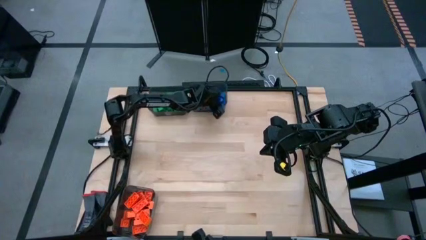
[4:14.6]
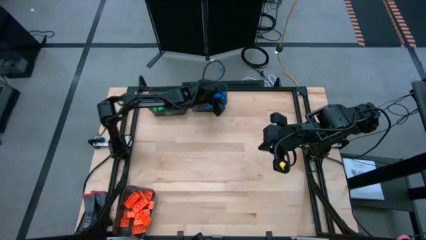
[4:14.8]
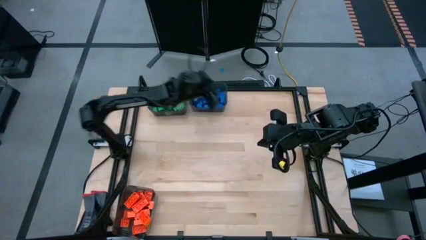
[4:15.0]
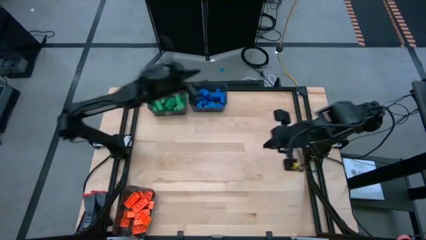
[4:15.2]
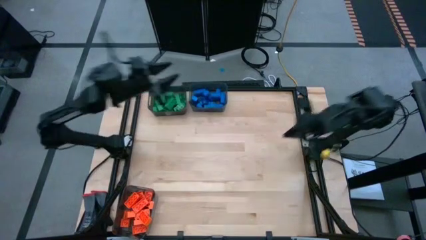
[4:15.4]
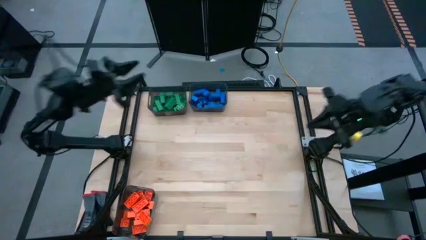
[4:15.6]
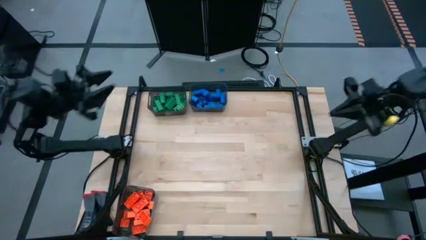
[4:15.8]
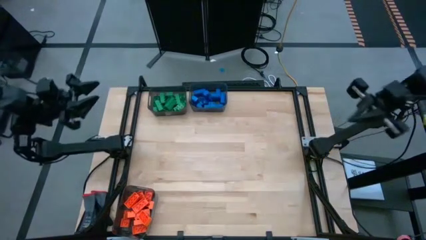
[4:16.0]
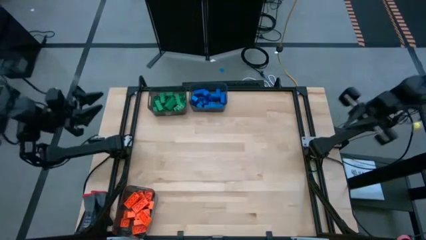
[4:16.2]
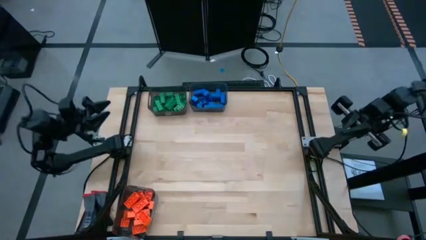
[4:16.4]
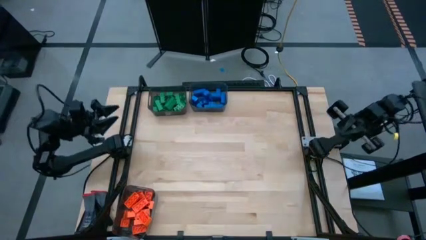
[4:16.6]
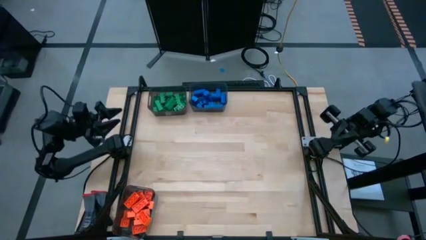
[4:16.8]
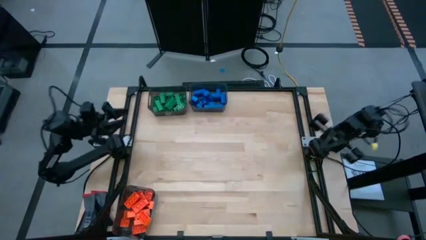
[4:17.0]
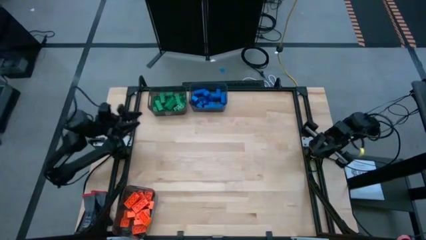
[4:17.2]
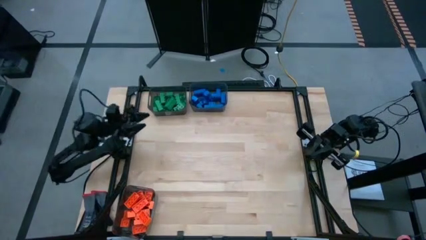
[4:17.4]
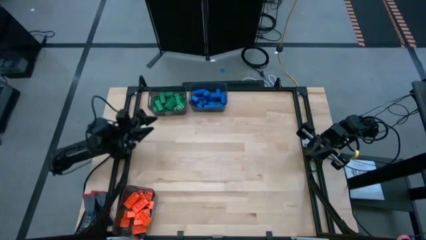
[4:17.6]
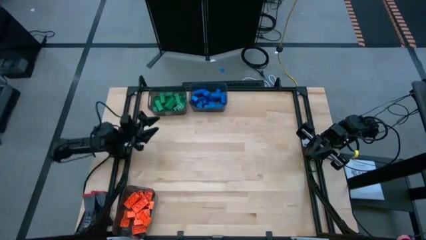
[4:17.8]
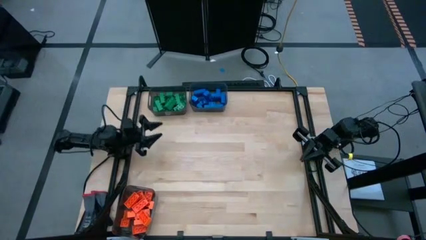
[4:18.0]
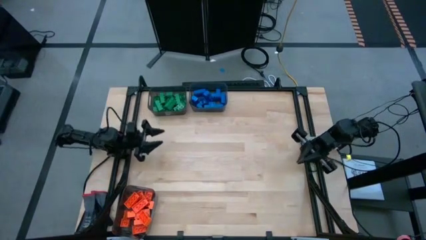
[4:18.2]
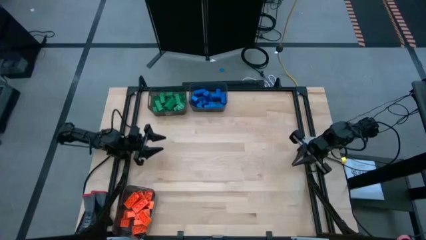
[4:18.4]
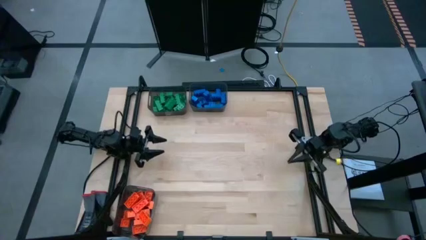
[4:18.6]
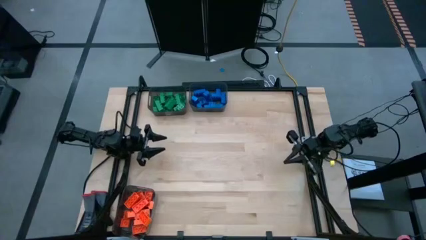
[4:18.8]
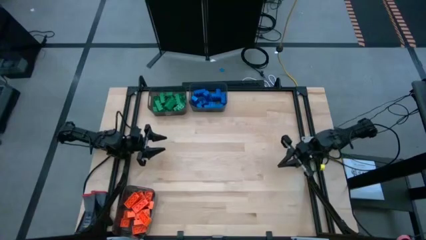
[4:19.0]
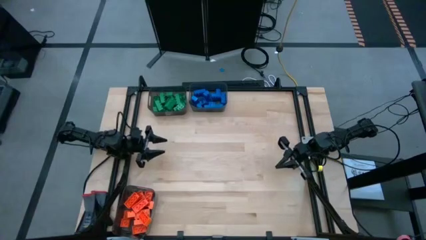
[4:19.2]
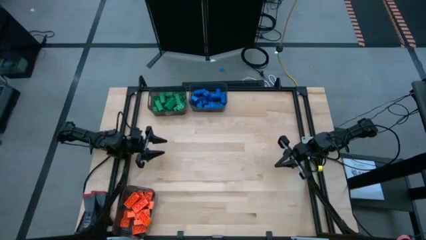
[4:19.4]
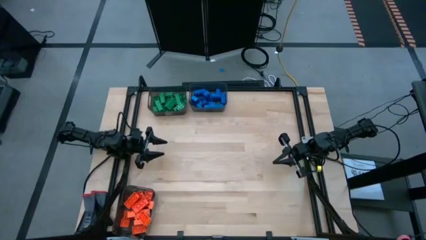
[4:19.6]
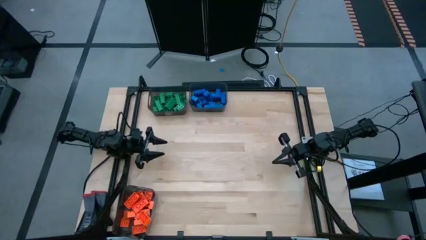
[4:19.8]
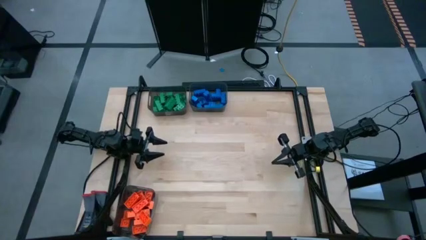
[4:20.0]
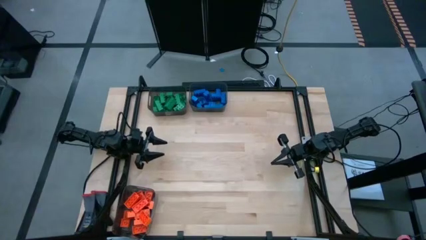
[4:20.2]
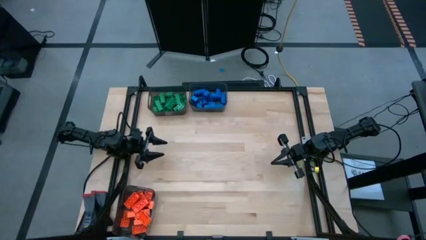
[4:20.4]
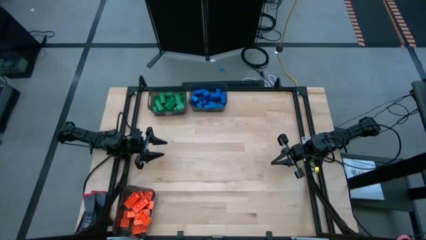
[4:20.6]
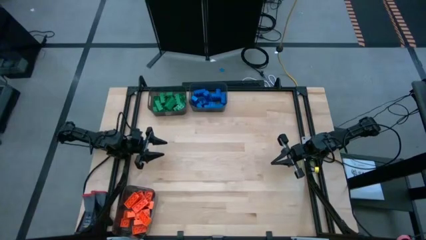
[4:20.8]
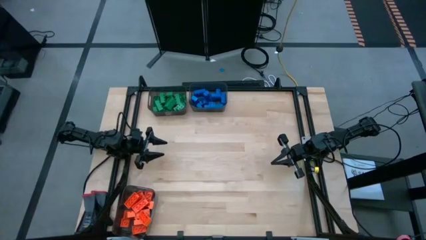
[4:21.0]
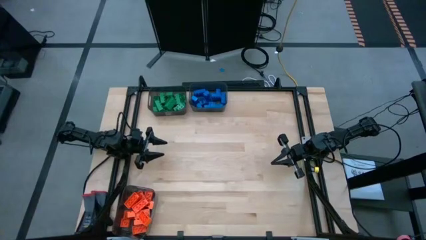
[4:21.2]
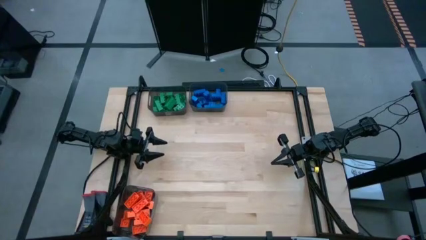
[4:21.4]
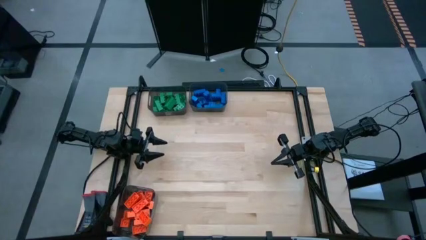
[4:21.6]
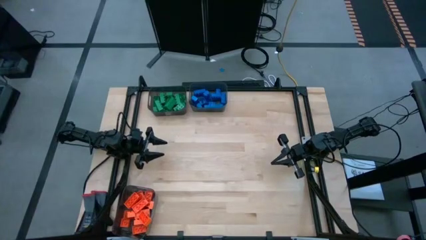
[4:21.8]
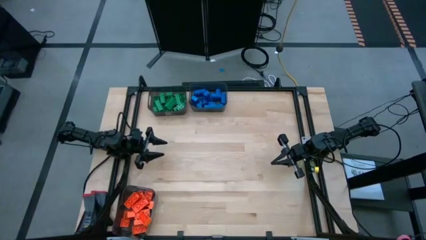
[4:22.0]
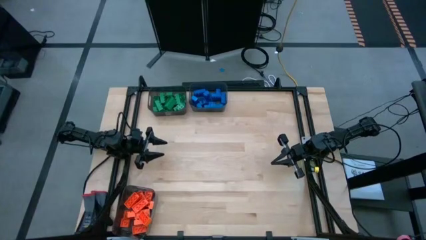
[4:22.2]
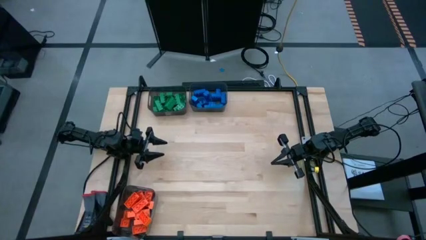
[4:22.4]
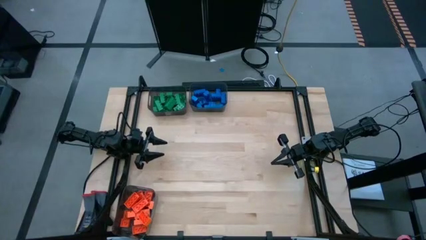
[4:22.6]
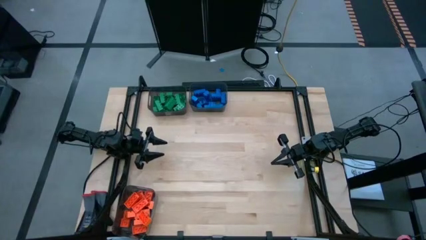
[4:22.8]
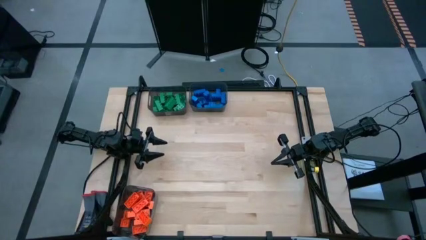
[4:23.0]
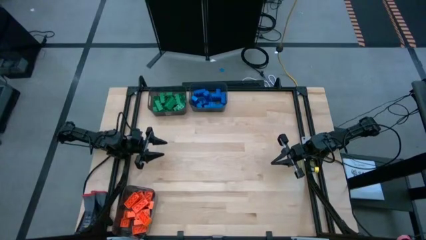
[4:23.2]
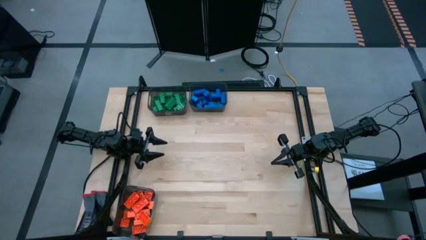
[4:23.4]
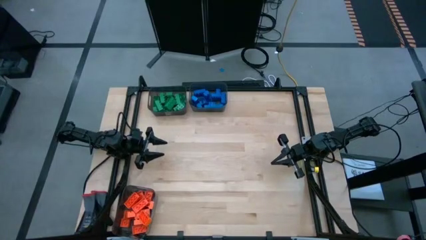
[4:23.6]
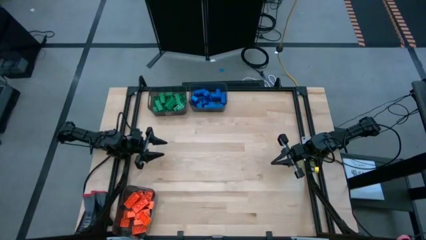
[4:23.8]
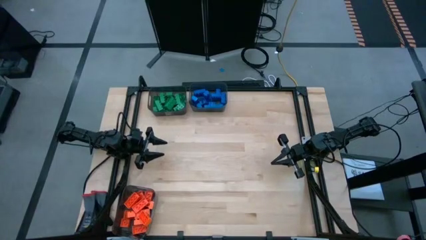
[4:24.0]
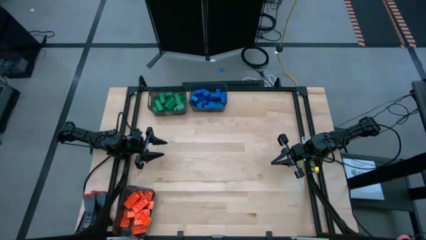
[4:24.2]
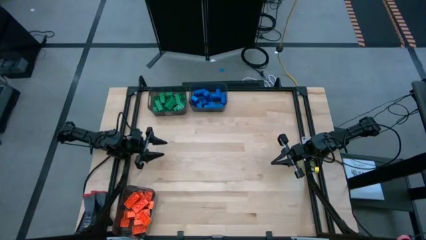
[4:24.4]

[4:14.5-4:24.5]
Task: Sort blocks
Return to Home Position

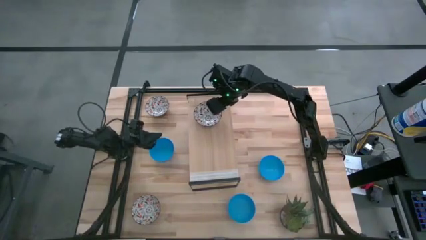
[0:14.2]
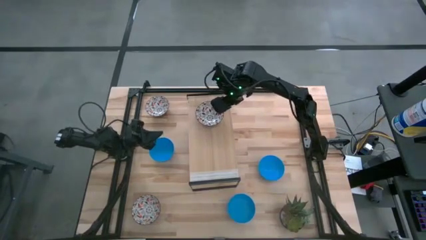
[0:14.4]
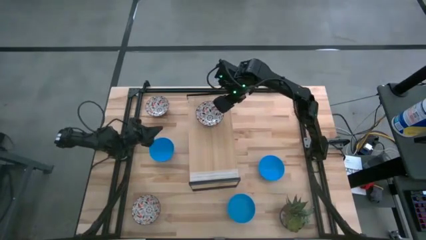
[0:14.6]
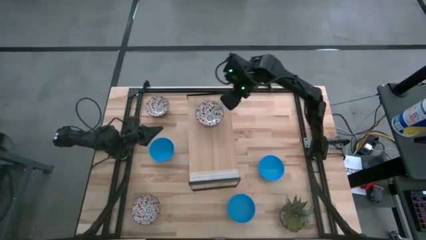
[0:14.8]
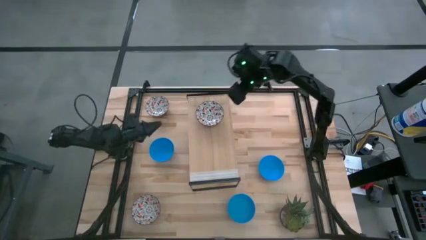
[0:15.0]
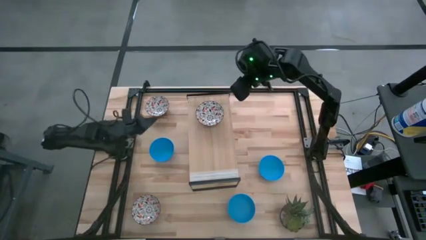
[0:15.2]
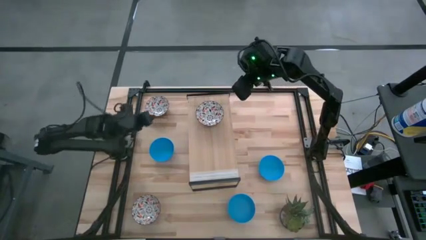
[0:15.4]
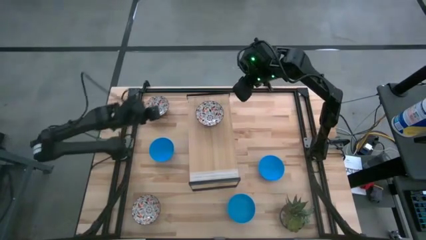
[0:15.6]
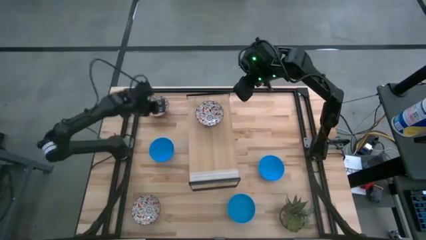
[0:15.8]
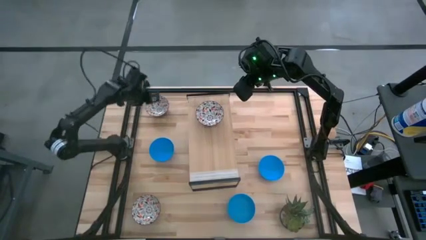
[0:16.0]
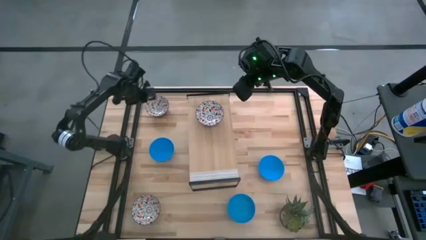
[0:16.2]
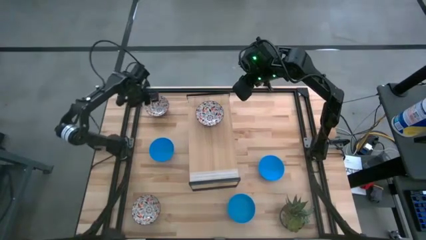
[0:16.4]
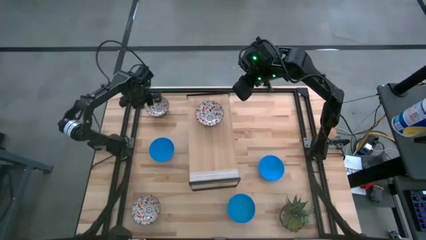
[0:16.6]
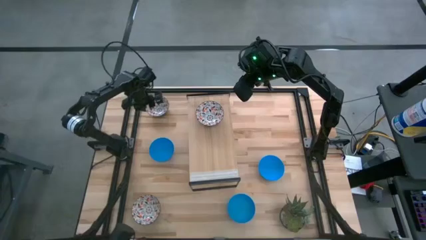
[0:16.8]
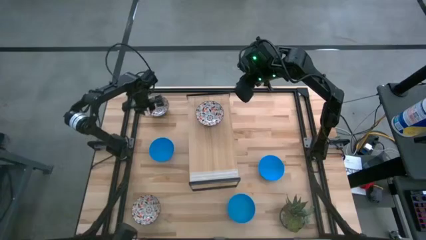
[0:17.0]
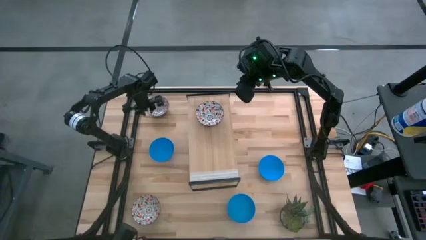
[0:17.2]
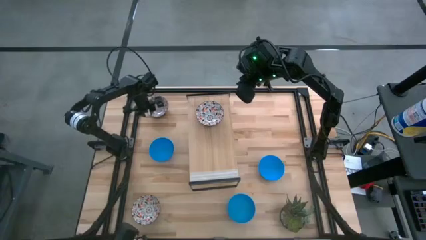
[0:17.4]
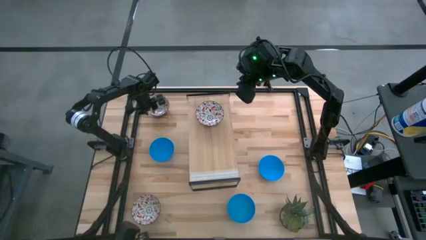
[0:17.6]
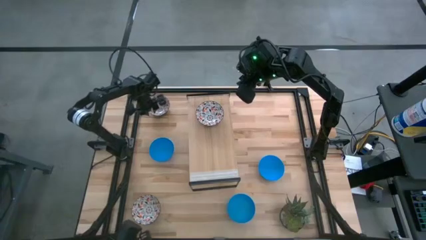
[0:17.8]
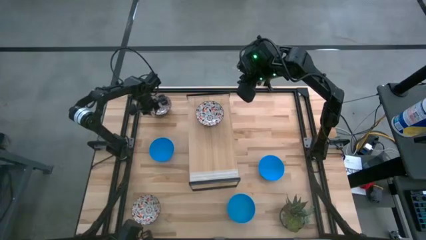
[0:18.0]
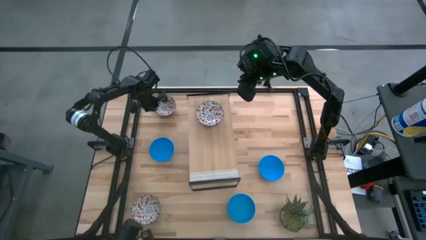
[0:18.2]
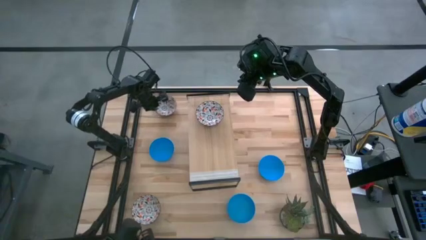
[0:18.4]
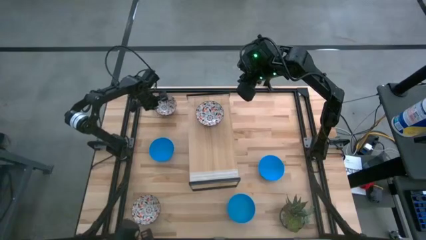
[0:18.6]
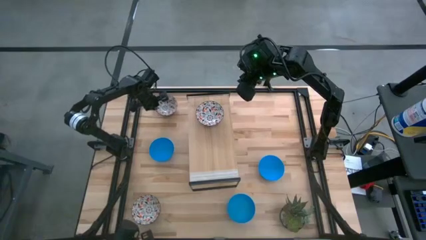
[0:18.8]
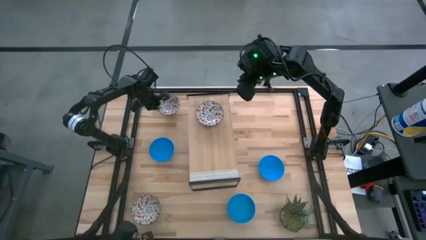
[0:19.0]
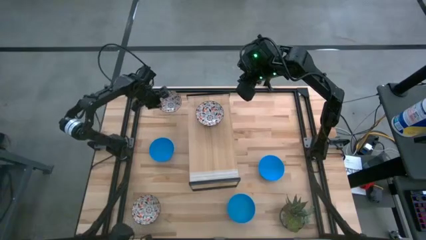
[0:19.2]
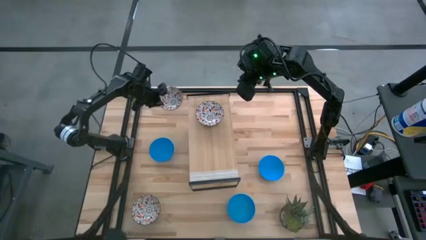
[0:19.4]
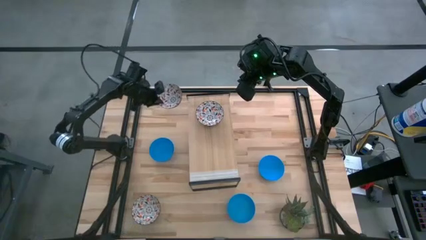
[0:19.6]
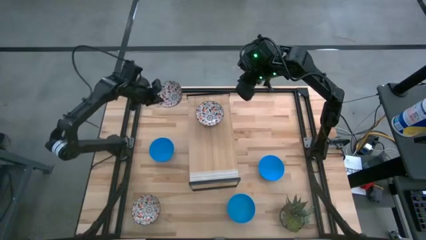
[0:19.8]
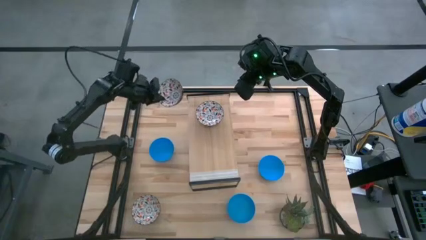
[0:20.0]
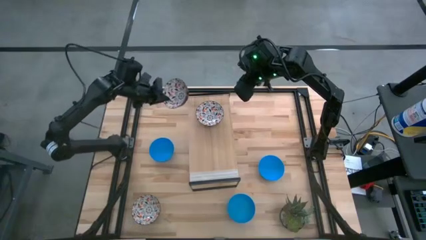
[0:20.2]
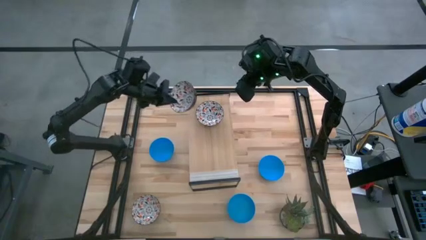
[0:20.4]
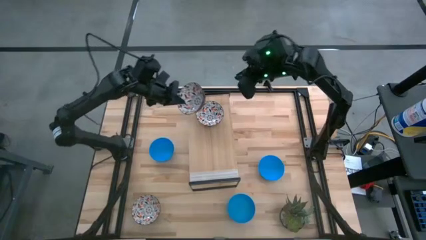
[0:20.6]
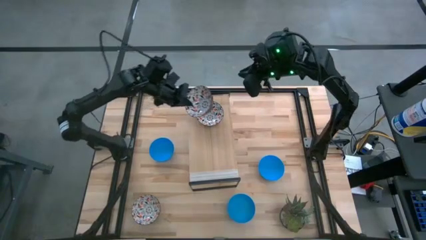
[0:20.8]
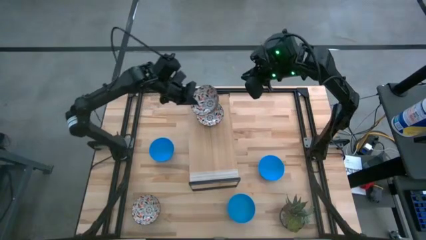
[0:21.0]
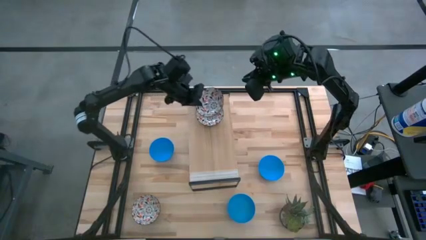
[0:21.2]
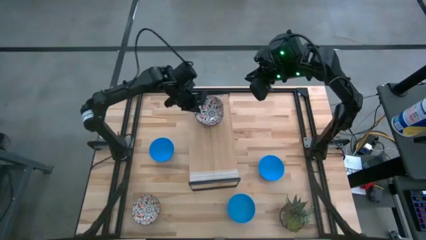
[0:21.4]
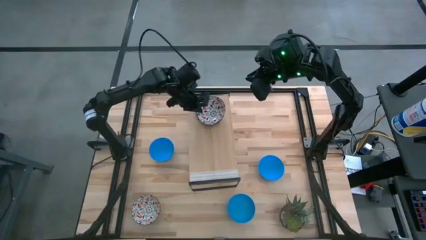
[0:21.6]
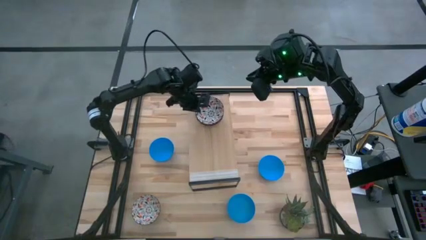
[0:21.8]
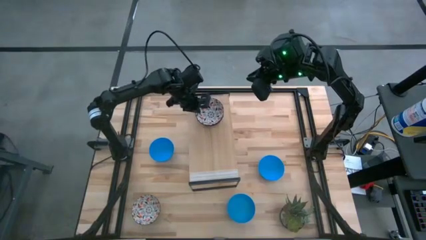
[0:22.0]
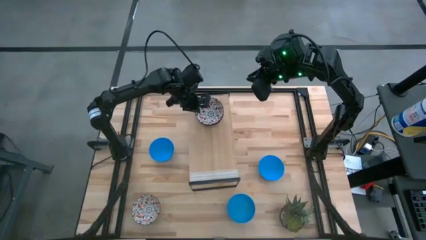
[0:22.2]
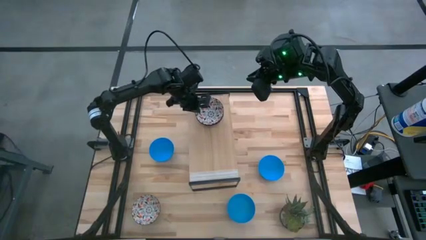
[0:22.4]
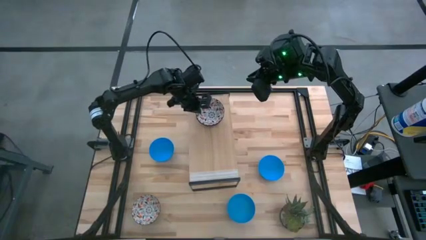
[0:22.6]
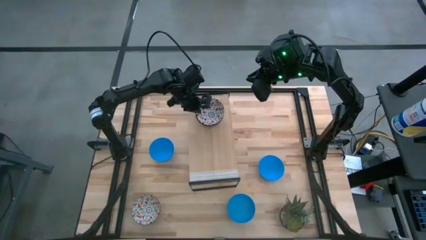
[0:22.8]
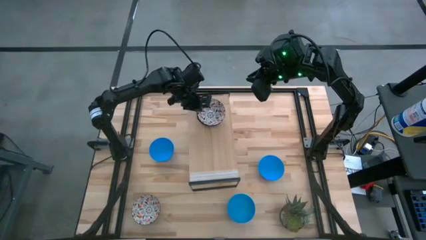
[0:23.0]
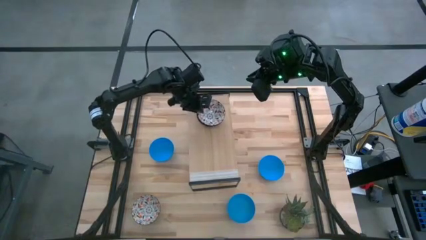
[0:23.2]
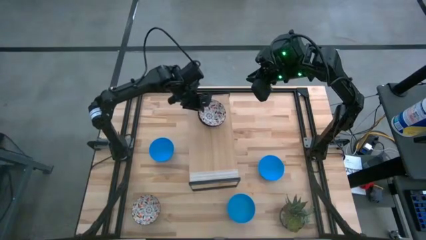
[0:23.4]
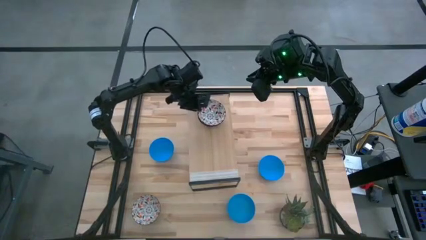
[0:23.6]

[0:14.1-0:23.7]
Task: Pick & Place Mini bowls
Stack the top white patterned bowl on top of the white patterned bowl on the shelf
